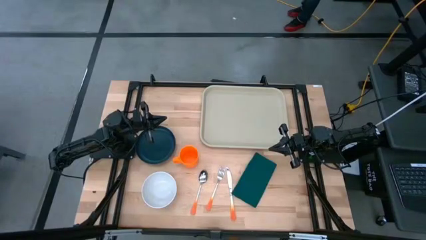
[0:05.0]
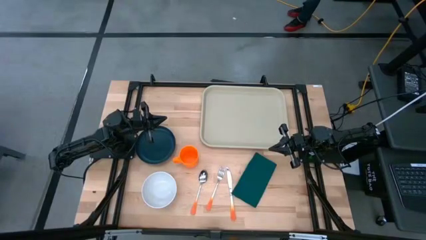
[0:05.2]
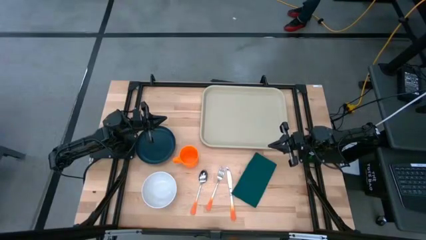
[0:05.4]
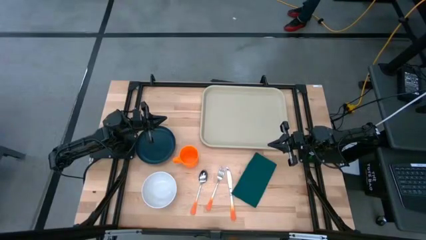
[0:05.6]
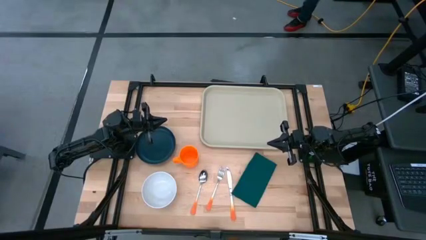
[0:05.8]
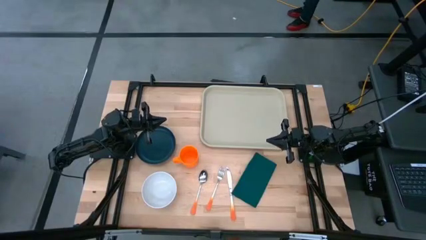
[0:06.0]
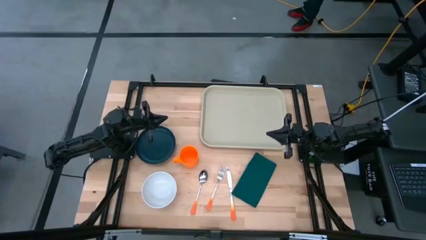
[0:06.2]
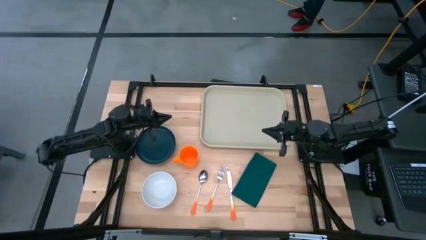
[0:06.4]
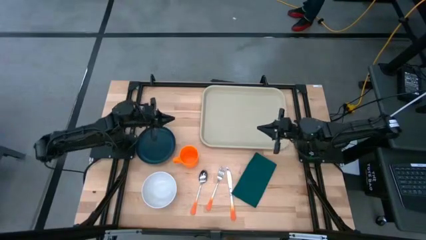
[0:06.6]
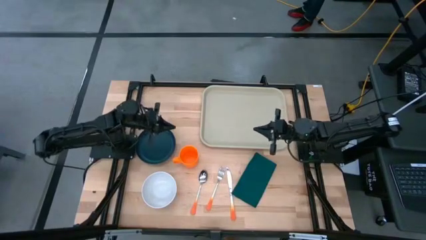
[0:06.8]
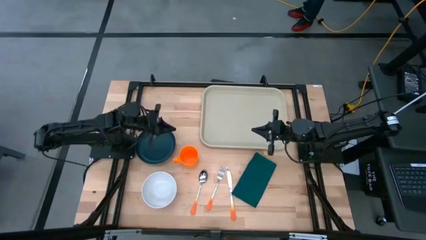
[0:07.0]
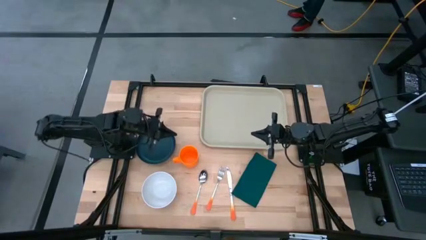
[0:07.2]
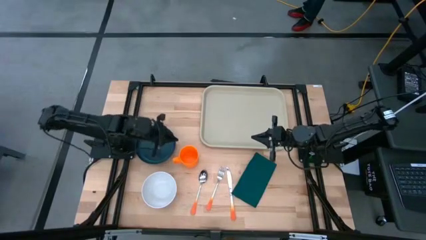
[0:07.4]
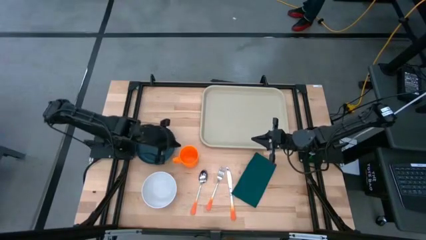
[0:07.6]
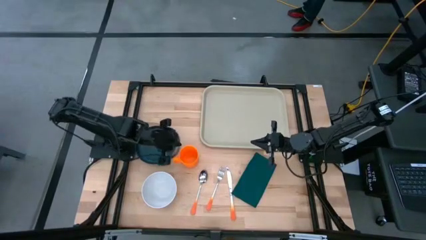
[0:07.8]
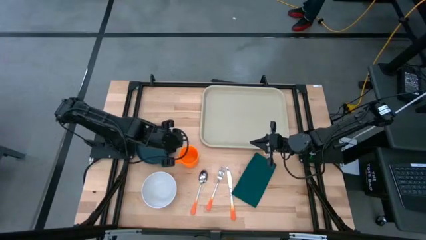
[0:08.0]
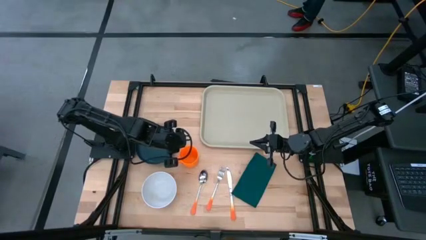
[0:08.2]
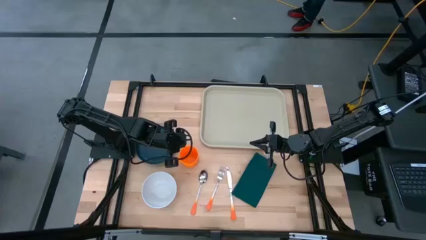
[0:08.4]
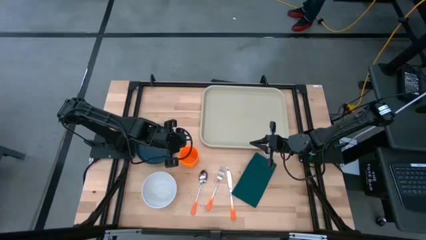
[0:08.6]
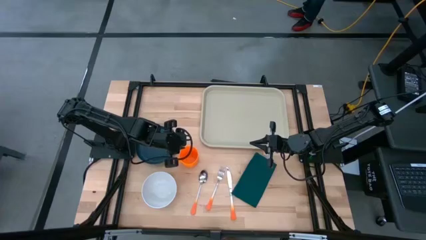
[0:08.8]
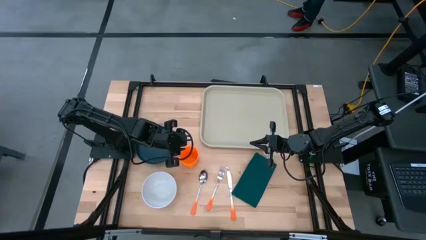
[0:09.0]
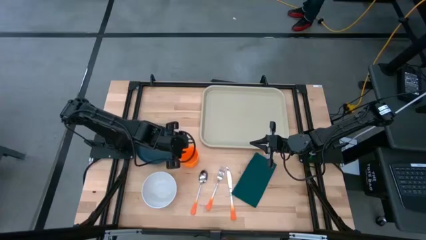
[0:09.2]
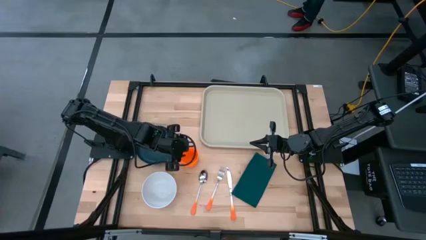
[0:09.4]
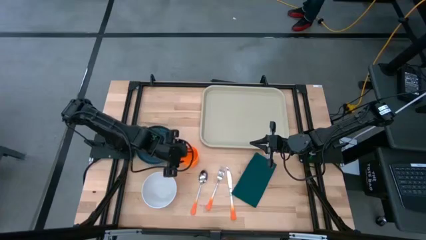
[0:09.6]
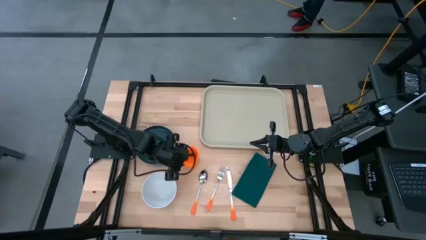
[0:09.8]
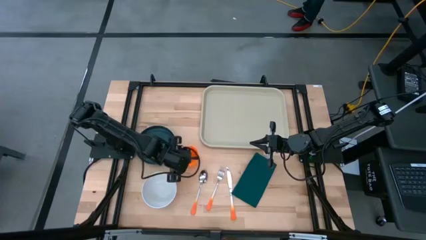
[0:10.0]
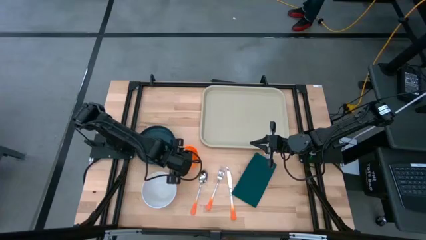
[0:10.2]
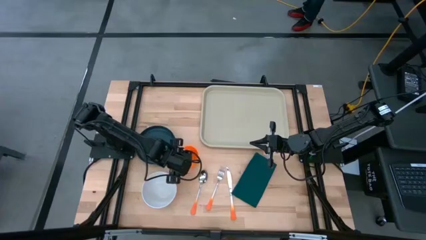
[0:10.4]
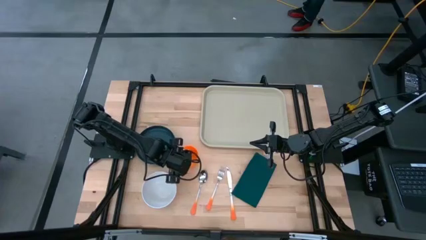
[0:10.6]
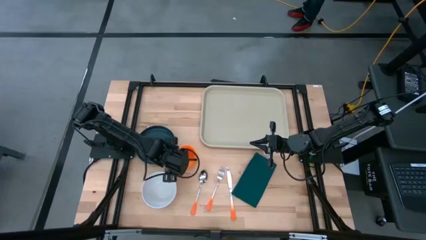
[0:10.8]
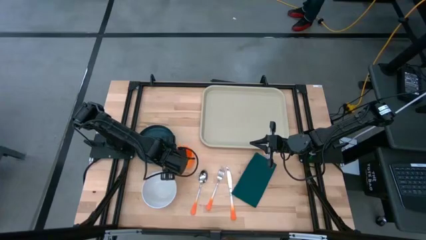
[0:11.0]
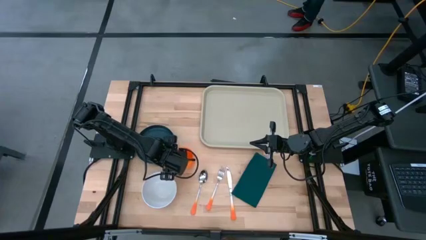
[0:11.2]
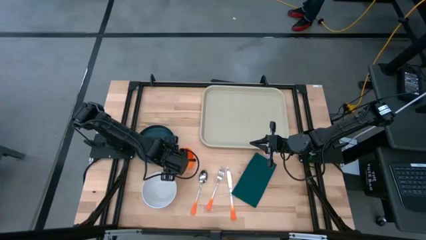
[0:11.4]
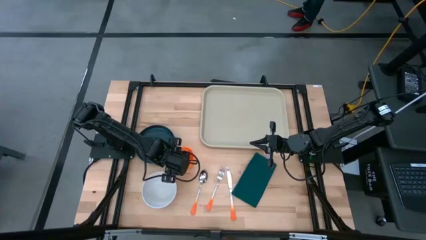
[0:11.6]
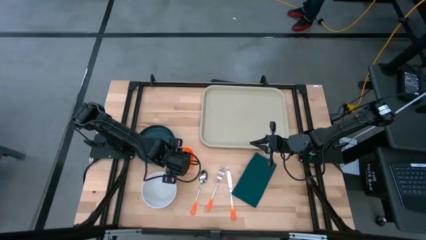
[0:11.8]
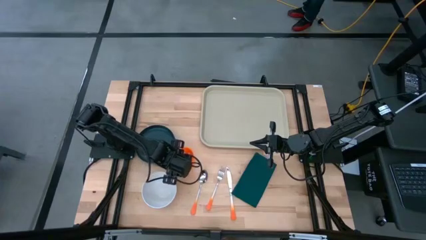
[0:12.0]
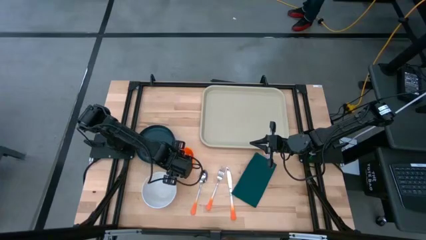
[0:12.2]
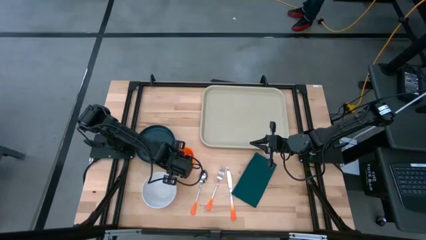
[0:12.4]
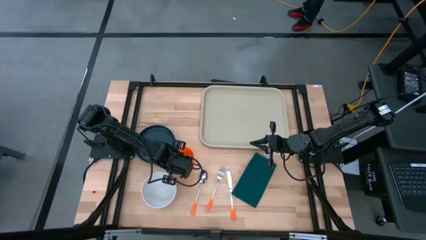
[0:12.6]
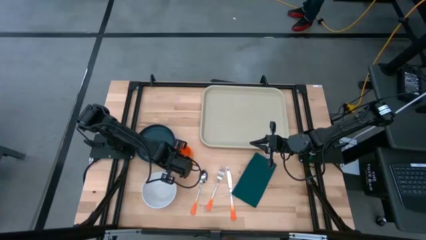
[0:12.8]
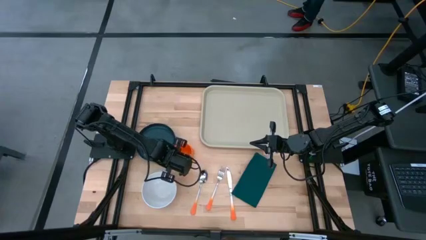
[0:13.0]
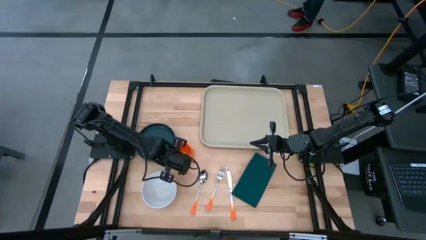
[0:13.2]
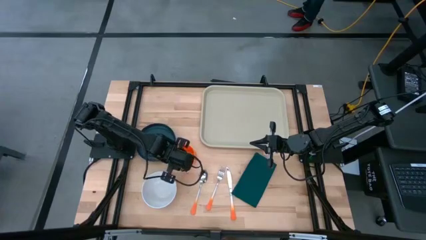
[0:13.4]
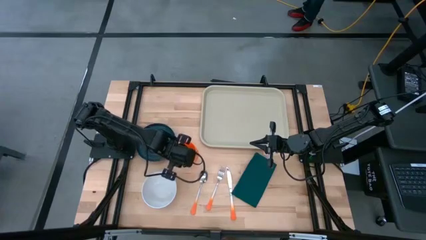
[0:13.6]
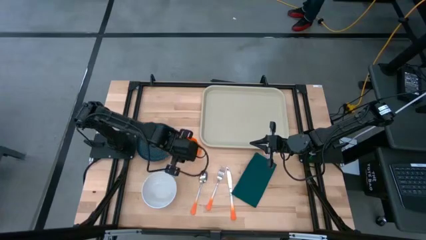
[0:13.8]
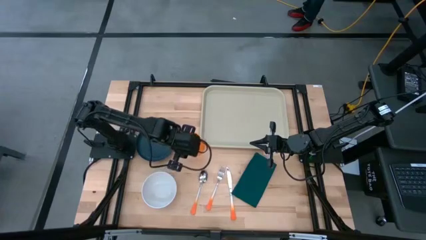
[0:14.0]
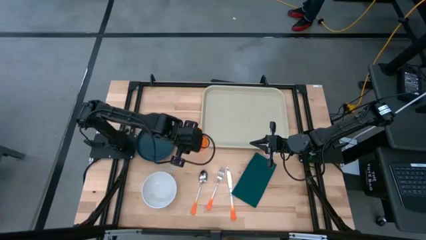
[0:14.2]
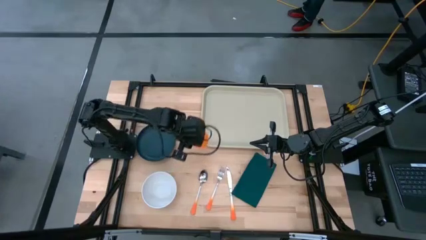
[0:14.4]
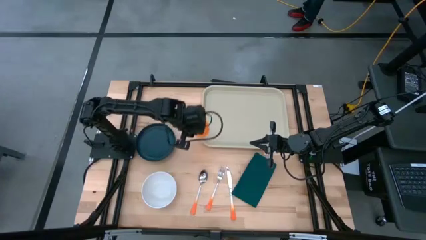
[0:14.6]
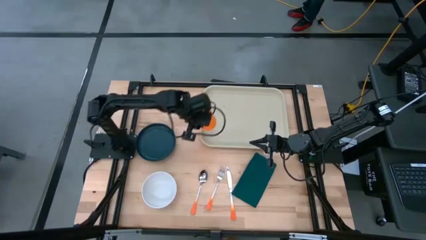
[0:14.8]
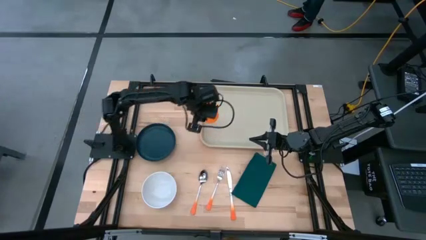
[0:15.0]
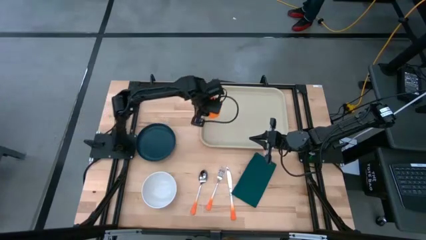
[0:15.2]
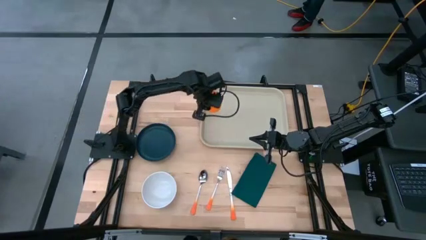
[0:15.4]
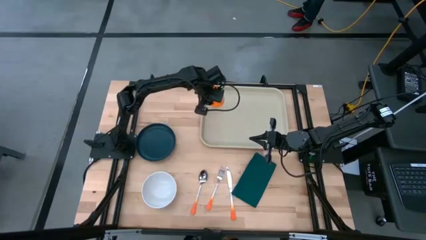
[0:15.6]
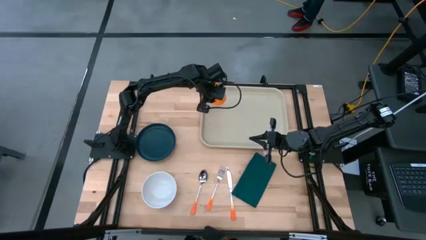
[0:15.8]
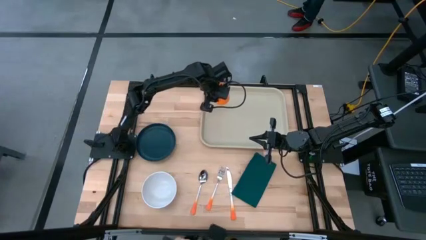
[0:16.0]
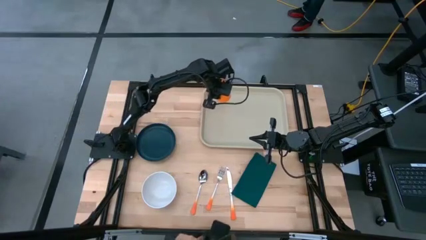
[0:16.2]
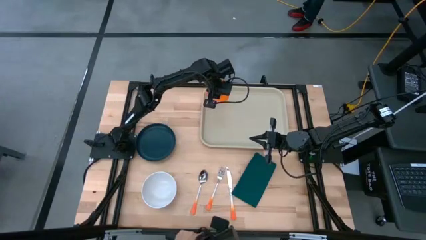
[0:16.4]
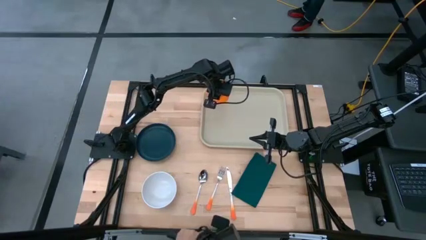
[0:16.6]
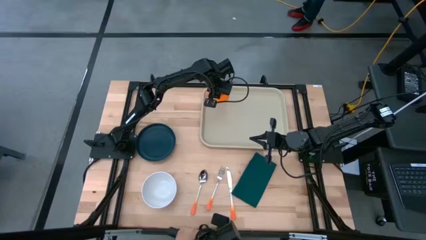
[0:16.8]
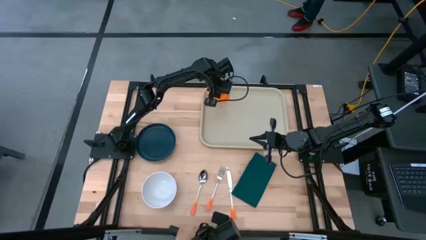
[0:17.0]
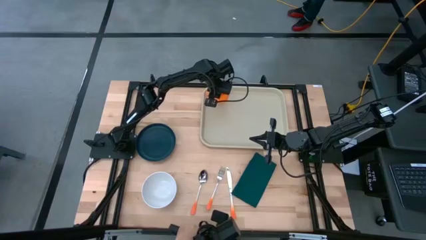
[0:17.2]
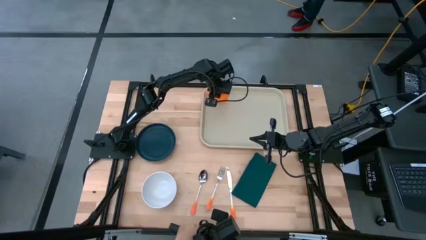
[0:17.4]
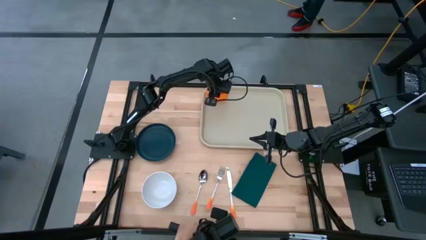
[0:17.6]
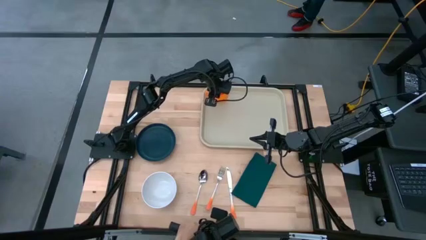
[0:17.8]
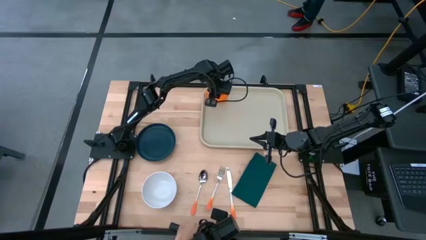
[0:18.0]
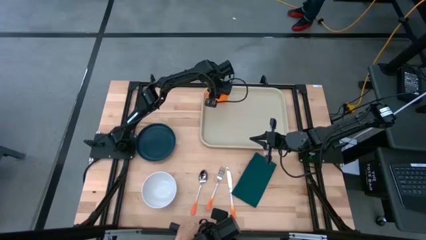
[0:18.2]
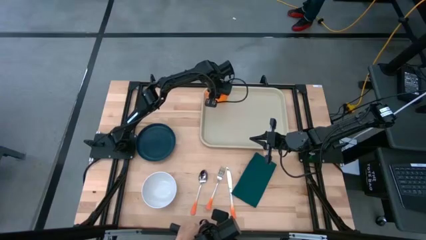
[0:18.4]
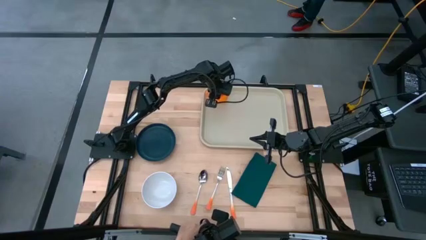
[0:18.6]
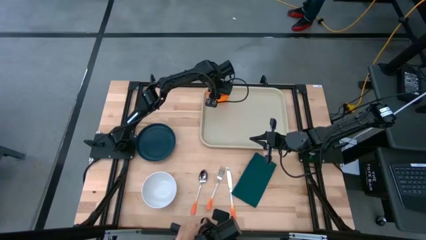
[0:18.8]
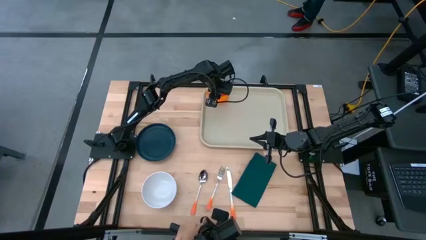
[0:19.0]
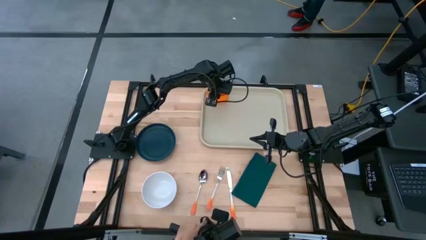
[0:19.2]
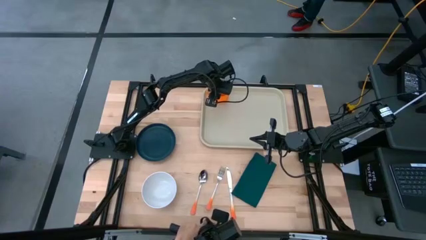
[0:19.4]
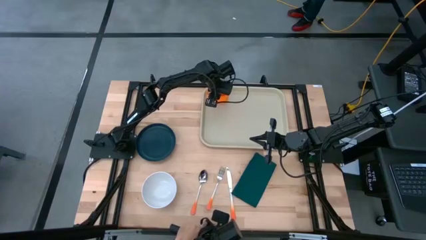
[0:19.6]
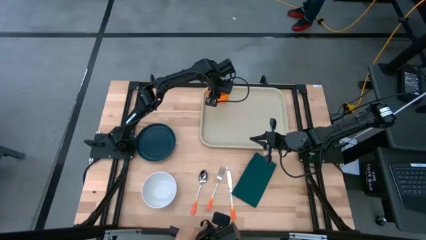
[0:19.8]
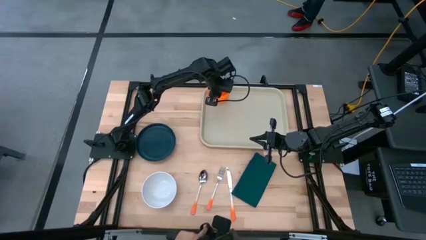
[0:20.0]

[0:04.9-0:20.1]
Task: Set up tray
Put the orange cup on the top left of the serving tray
